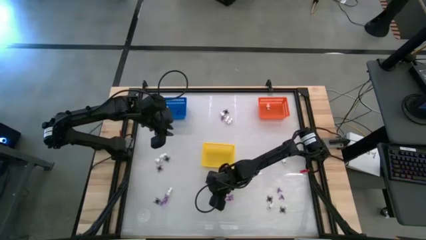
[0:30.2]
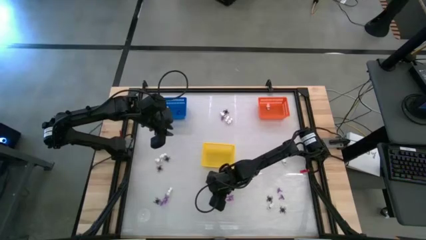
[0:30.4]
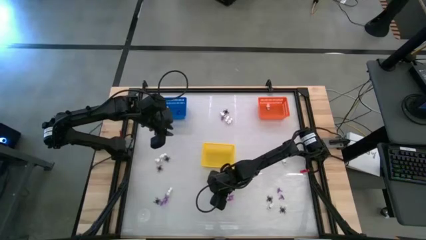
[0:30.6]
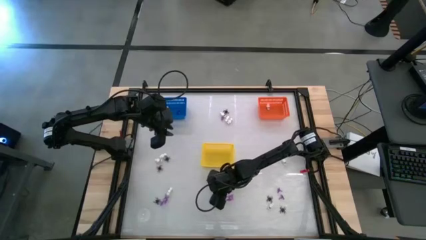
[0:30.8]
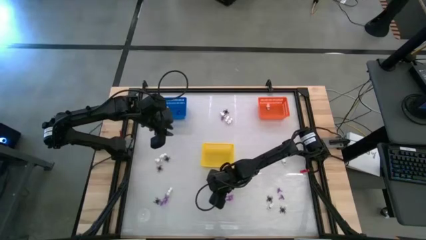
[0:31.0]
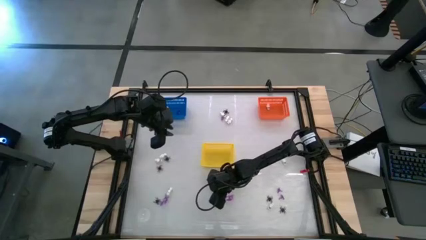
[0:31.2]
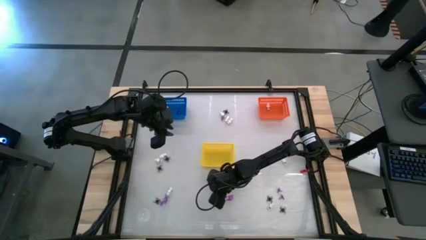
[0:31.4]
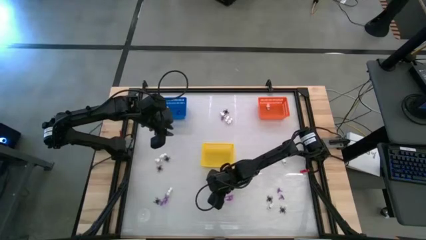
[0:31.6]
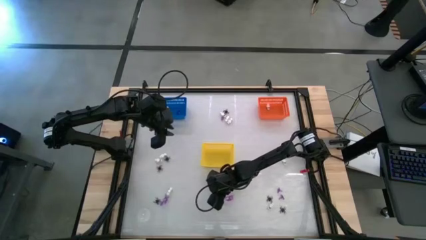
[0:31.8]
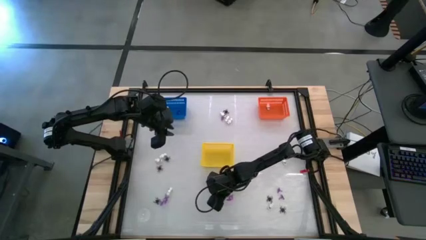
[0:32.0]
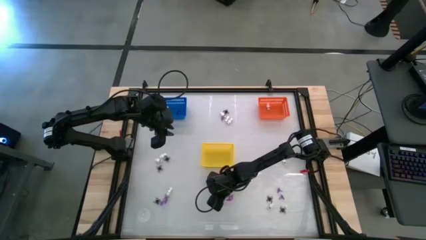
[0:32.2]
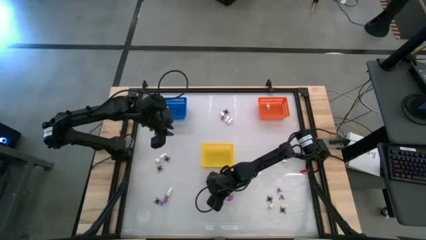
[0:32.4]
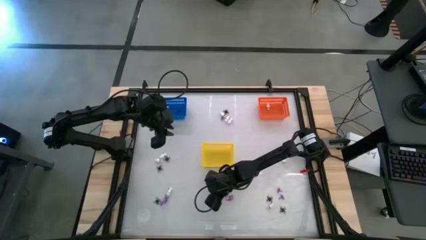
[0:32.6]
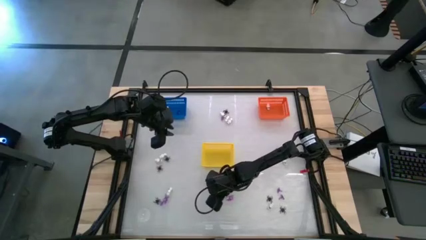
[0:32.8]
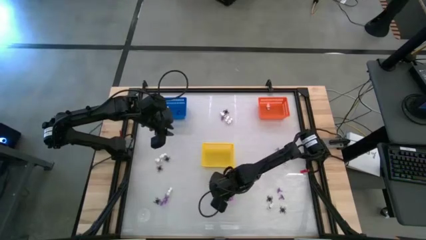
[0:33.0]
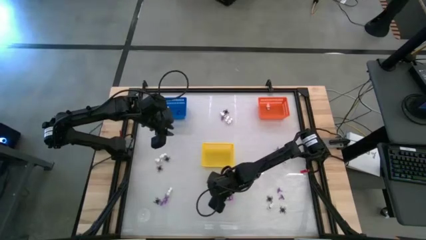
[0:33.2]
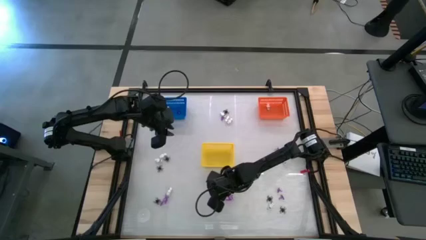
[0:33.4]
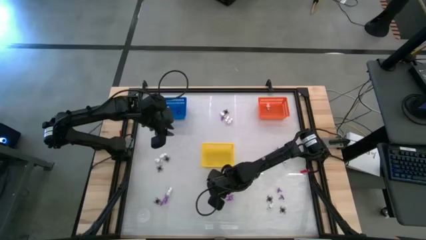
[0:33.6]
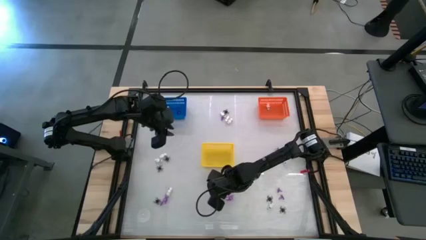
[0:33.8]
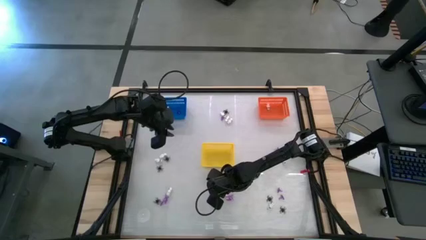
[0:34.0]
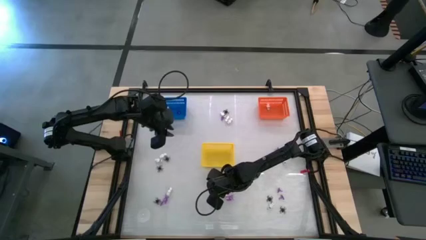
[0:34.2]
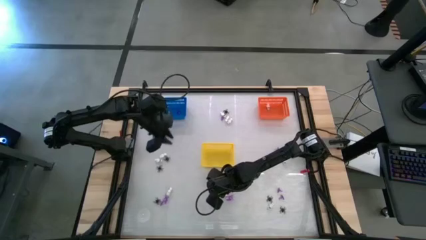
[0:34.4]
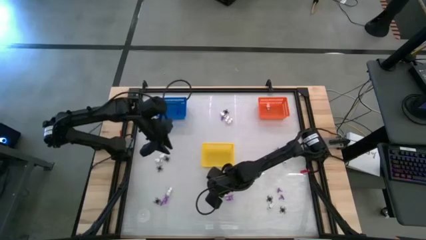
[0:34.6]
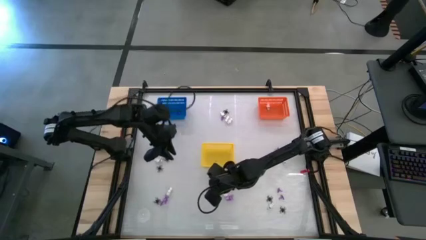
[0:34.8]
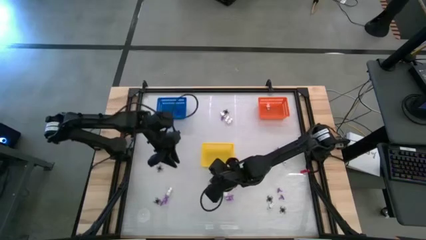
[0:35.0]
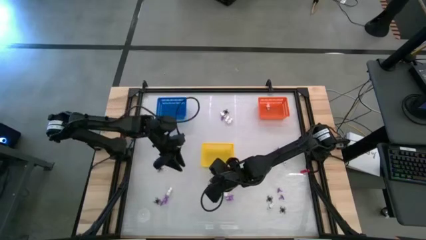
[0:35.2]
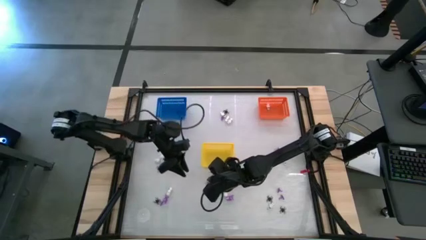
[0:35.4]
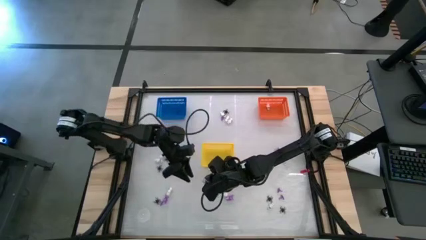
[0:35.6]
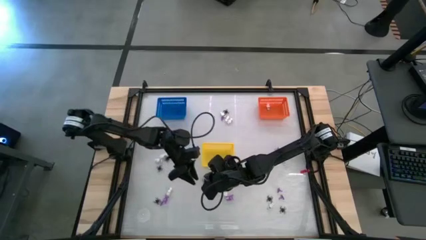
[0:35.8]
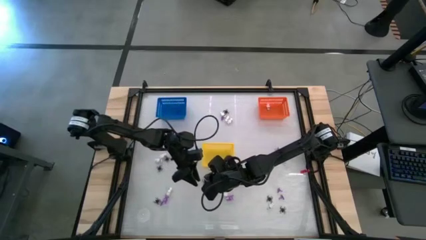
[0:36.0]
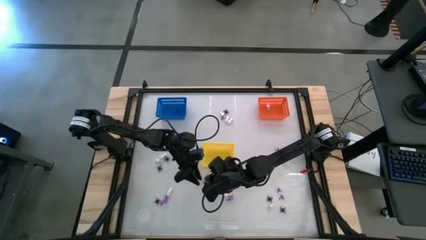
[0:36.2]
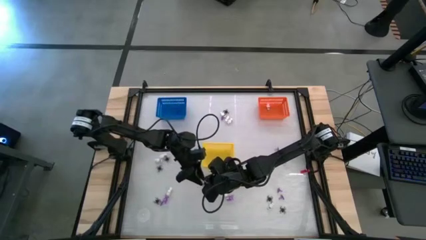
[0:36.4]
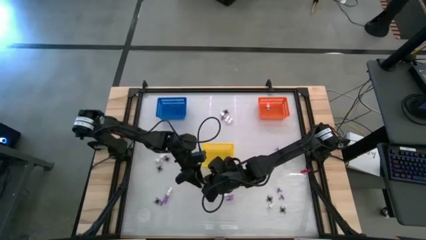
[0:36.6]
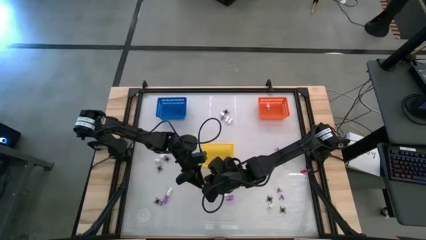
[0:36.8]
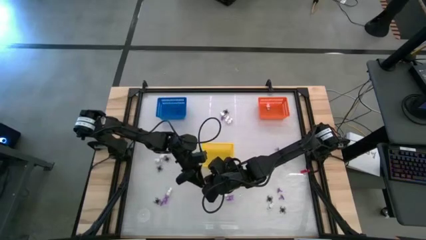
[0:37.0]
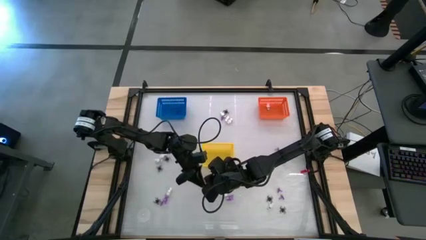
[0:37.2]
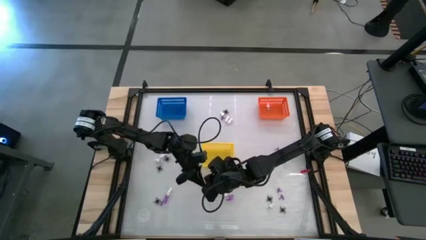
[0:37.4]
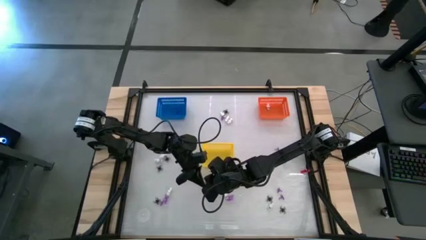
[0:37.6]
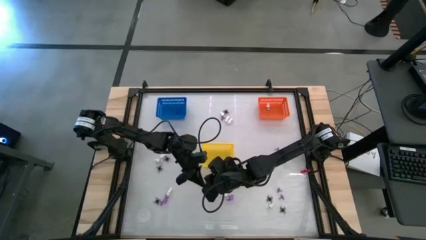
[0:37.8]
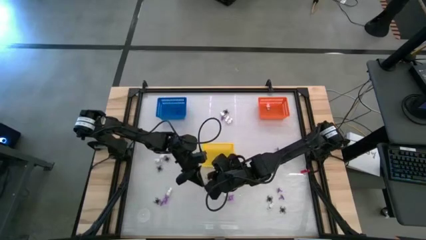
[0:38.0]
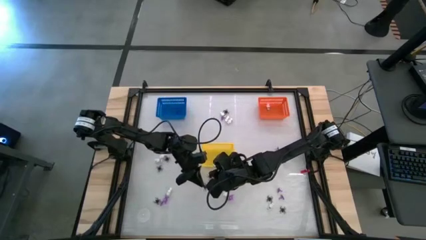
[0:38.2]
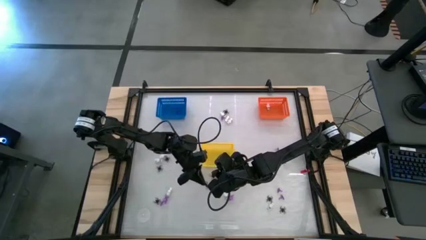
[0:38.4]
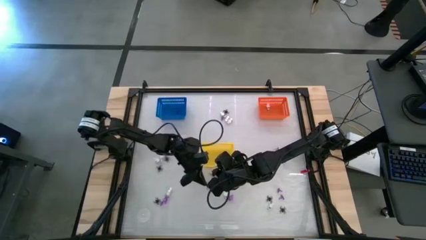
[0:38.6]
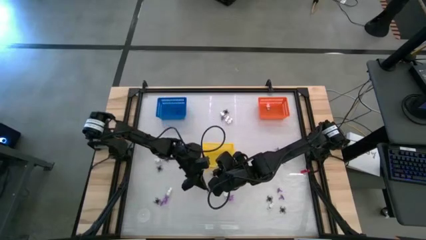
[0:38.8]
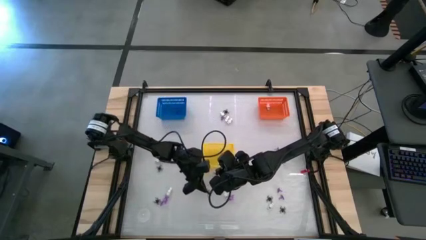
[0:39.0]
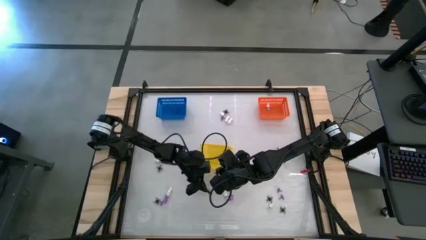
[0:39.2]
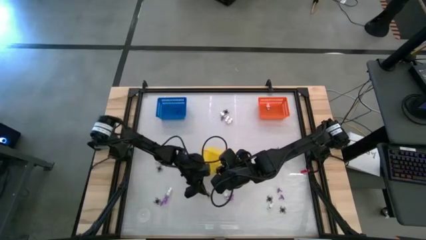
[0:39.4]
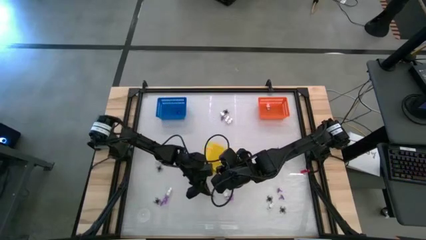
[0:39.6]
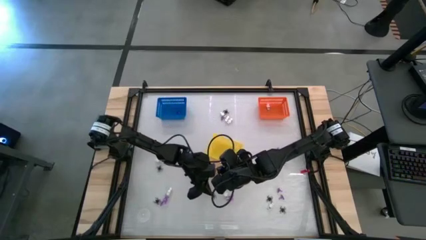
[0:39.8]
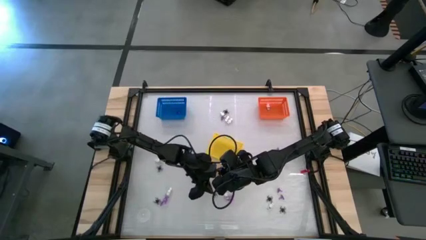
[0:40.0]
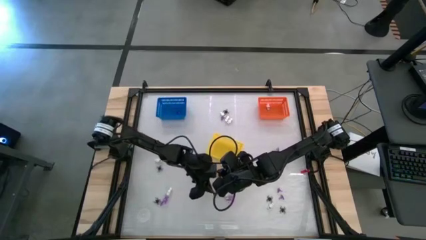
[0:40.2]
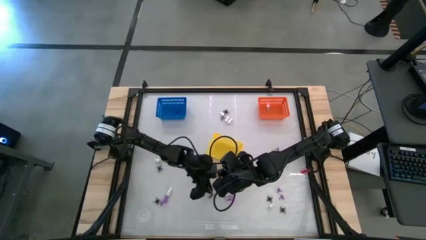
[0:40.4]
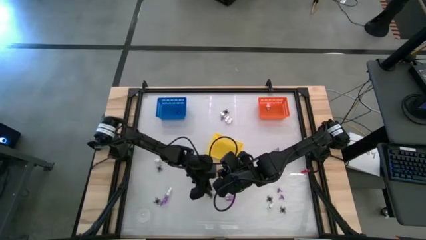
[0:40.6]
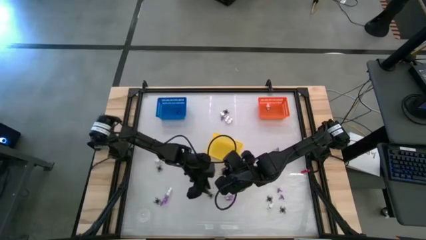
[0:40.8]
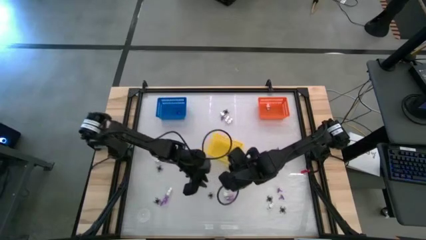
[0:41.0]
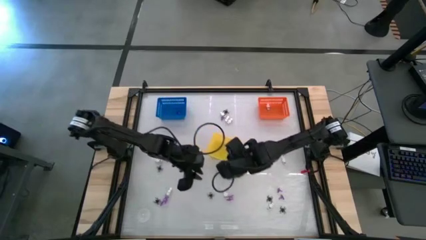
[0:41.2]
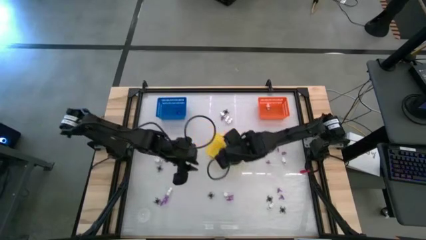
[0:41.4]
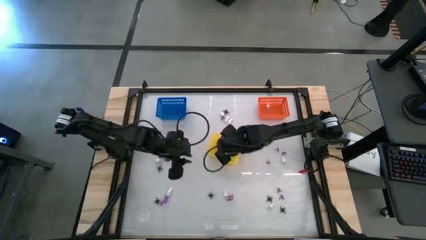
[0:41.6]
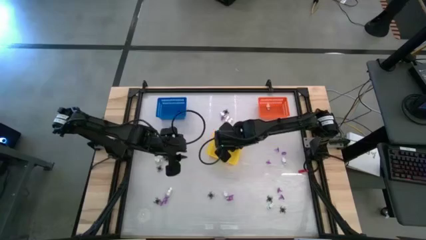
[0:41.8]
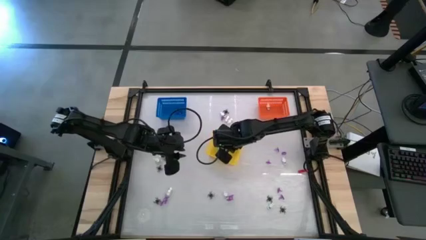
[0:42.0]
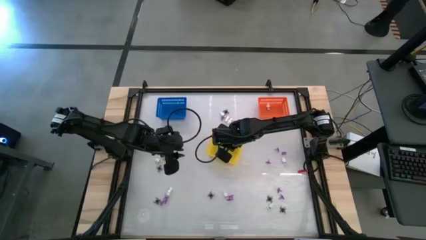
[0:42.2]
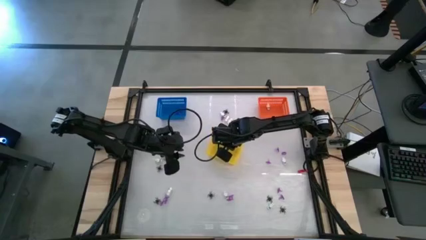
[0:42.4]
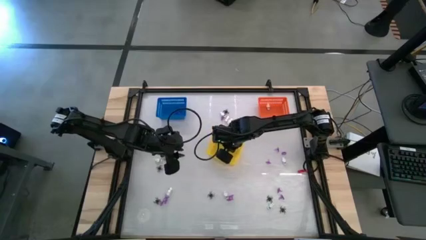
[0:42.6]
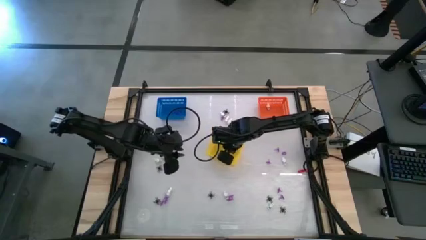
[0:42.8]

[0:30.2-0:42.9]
Task: Sort Halloween decoration
Put the black spider toy into the yellow bin
